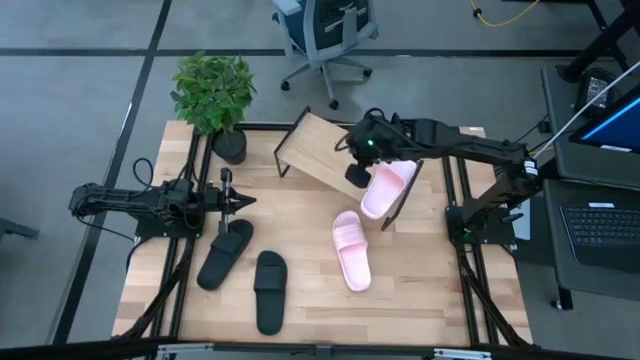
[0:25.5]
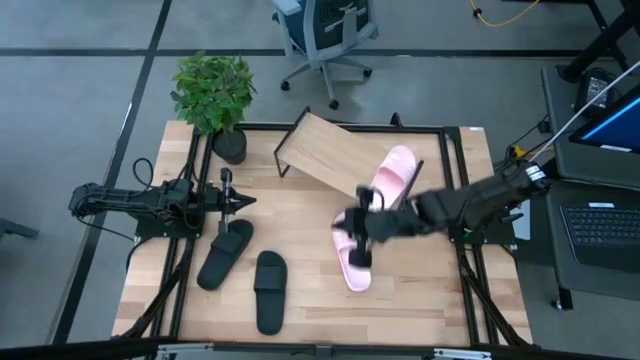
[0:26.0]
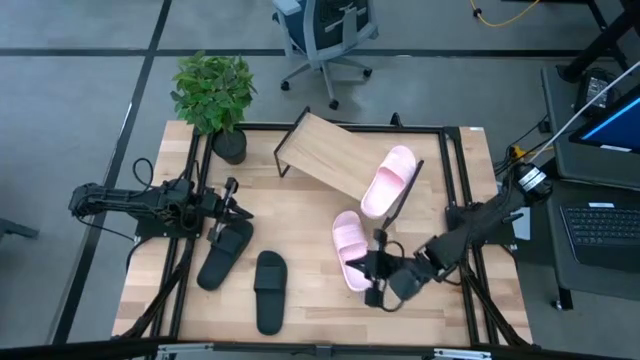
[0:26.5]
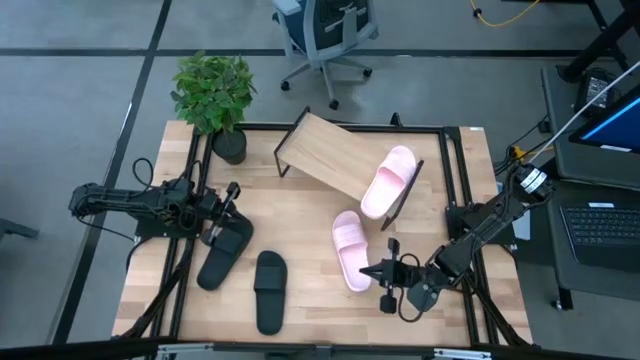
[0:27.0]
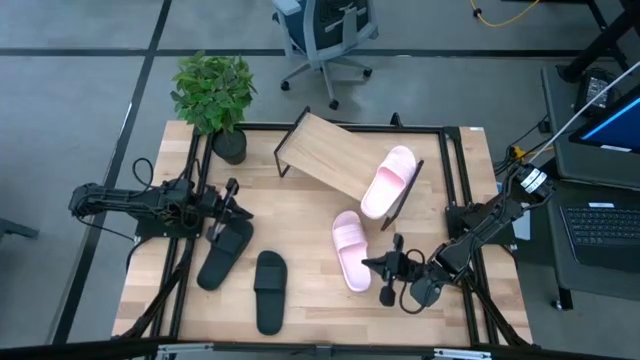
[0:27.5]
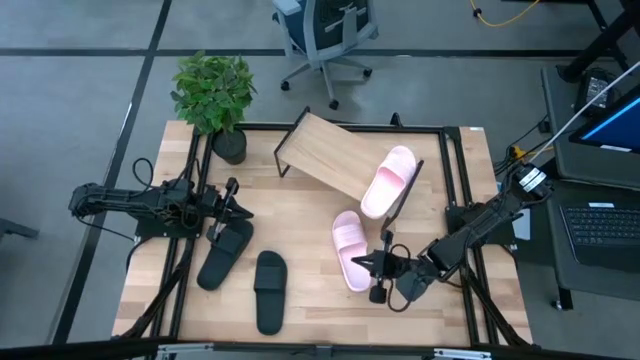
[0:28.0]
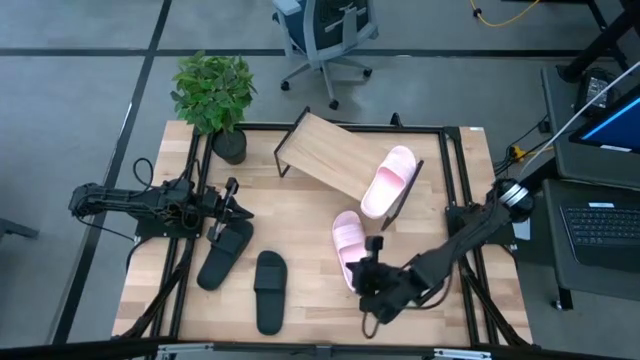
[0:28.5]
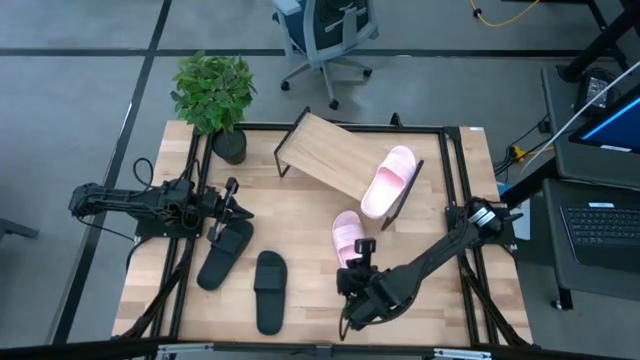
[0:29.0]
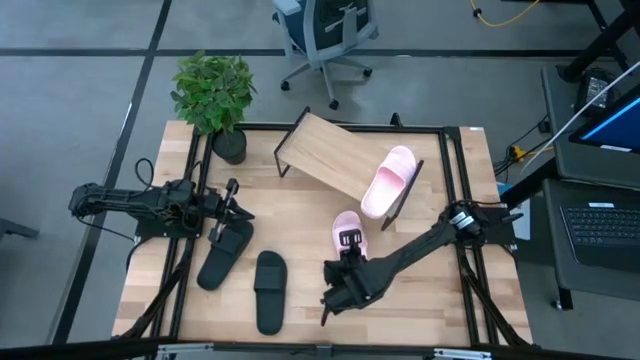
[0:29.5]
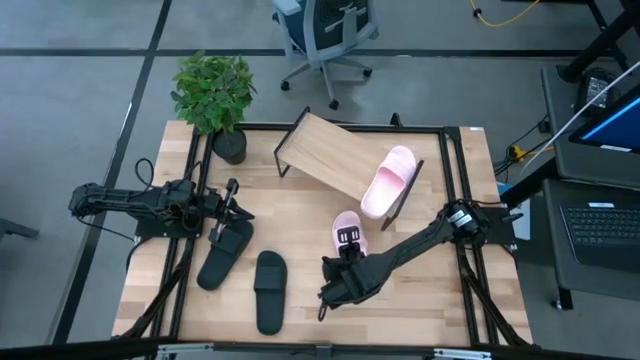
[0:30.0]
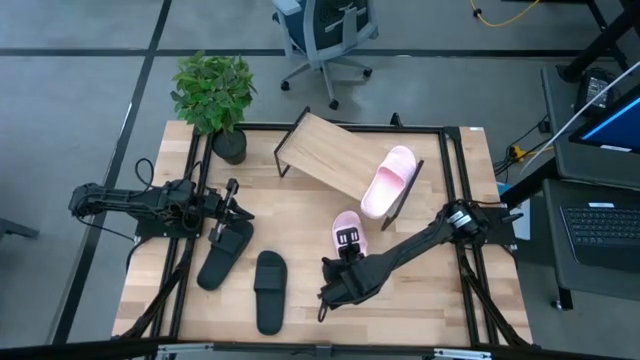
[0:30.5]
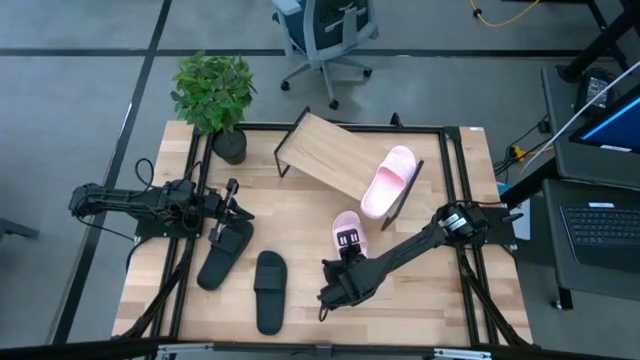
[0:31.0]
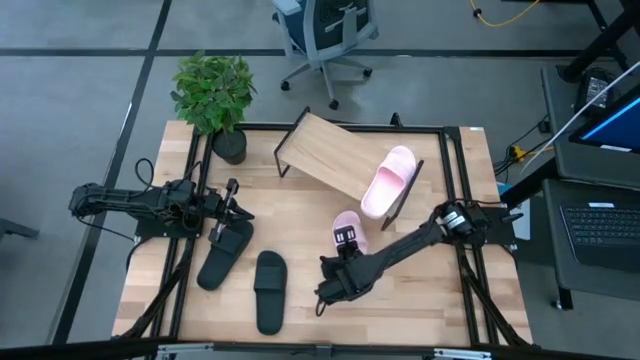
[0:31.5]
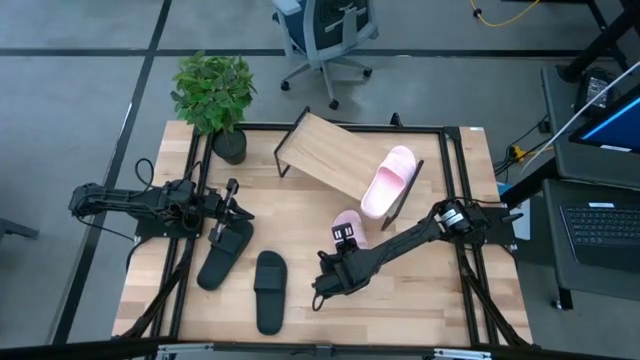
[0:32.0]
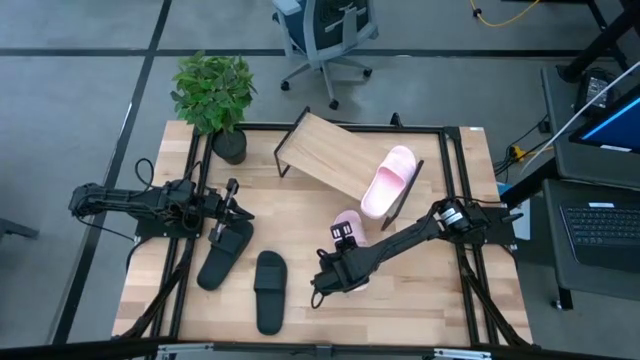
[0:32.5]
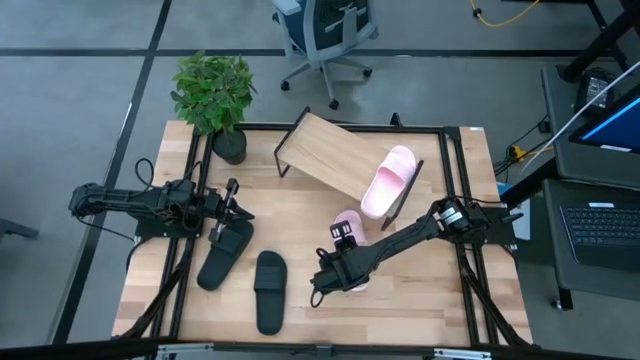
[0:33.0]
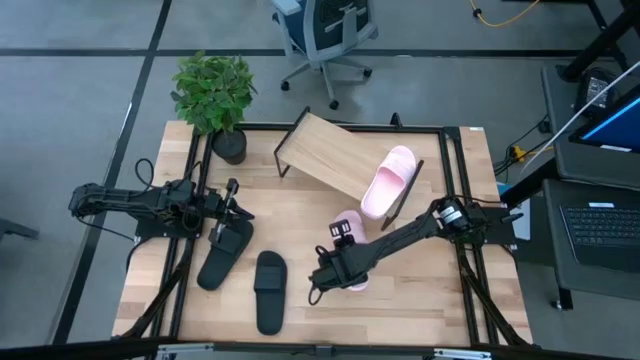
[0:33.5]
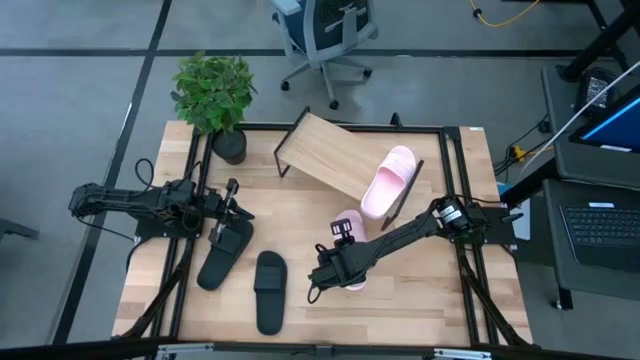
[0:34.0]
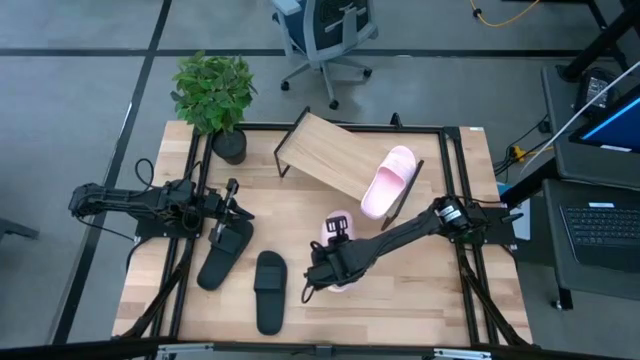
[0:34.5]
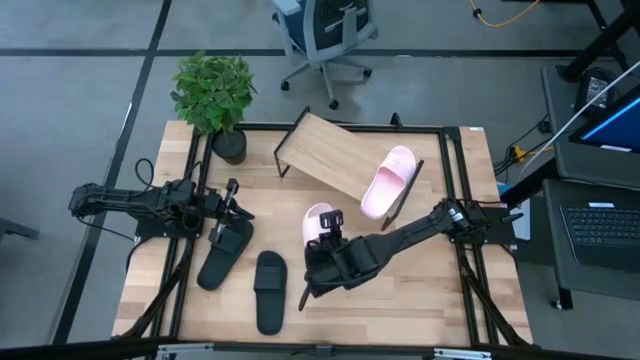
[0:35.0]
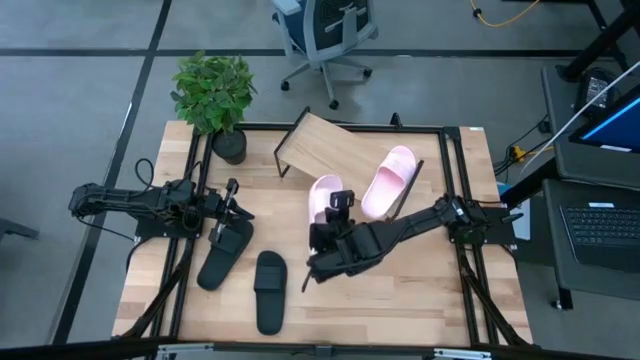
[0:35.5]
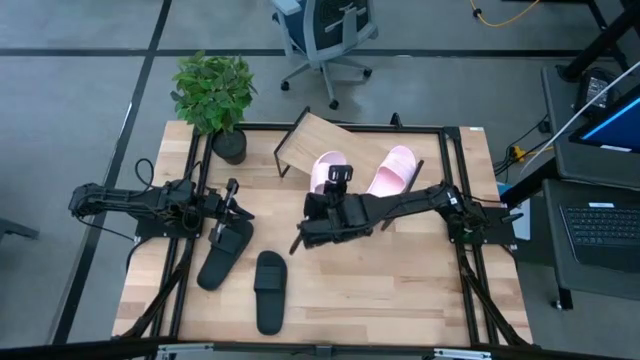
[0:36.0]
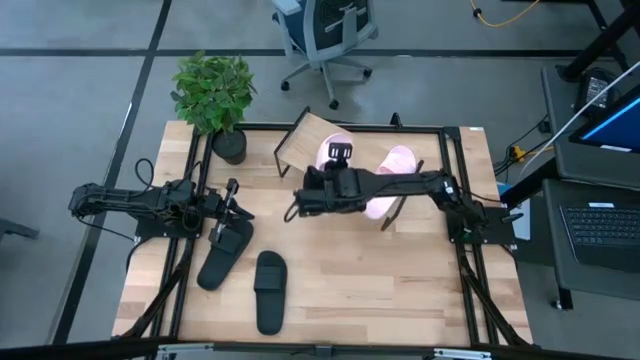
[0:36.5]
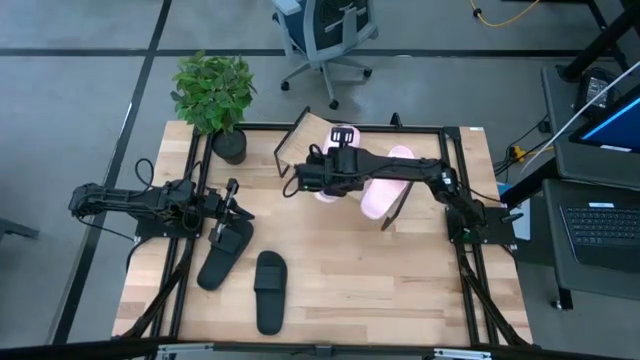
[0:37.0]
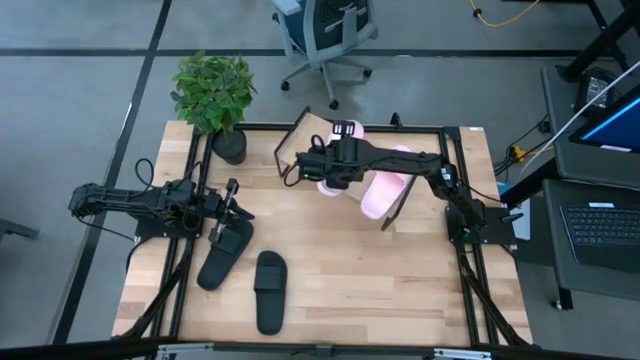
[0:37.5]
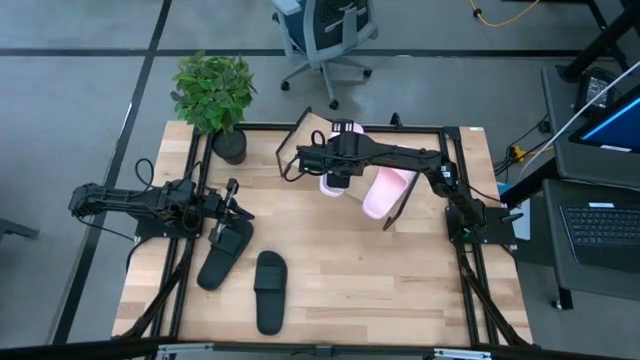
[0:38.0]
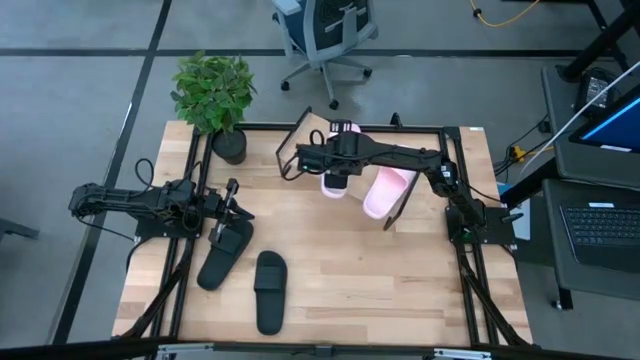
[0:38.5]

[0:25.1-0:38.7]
Task: Pick and place slides into the shelf
Put the pink slide on the shelf

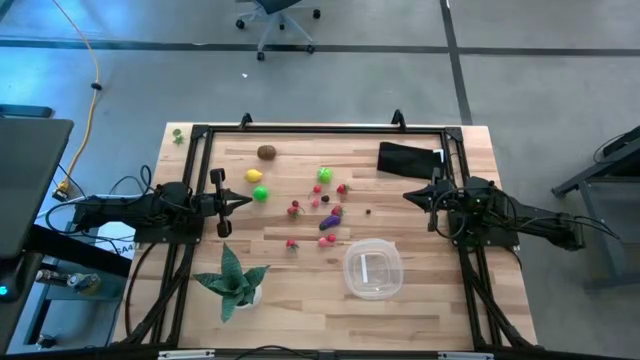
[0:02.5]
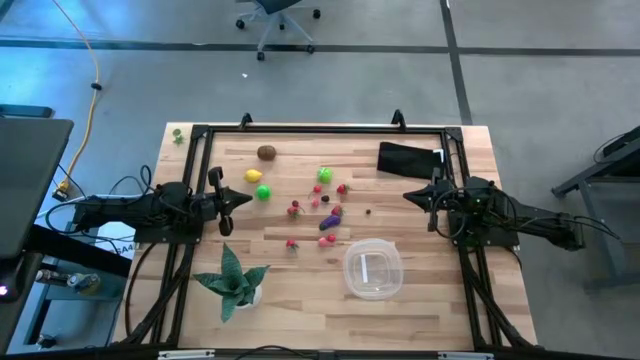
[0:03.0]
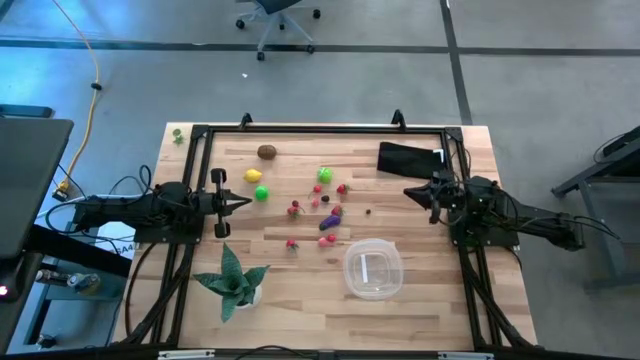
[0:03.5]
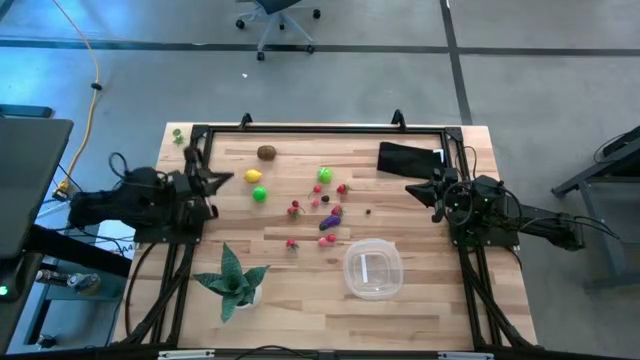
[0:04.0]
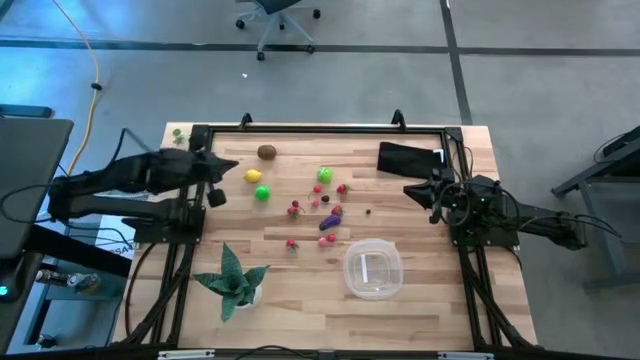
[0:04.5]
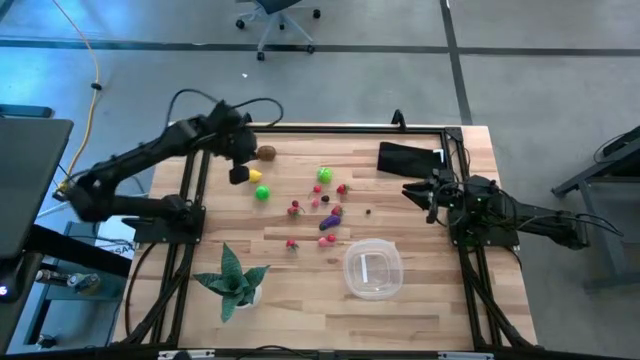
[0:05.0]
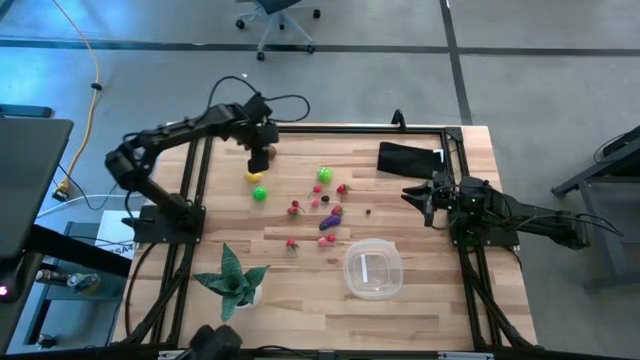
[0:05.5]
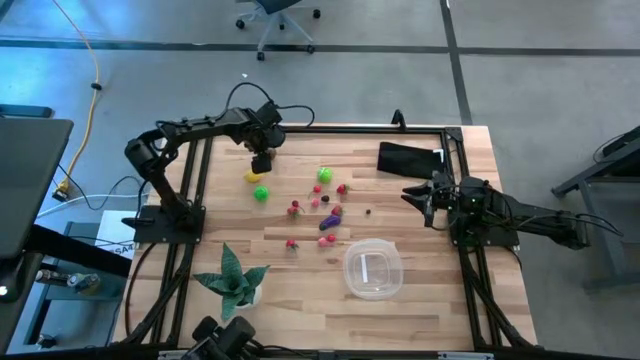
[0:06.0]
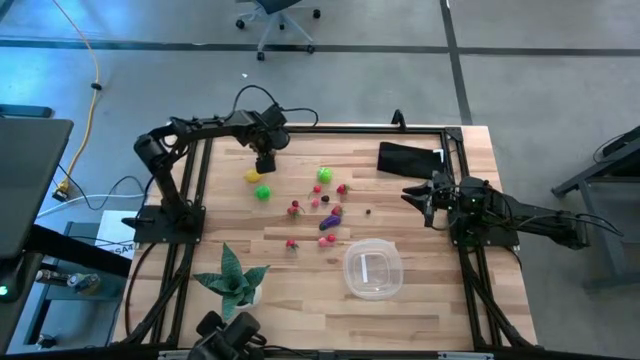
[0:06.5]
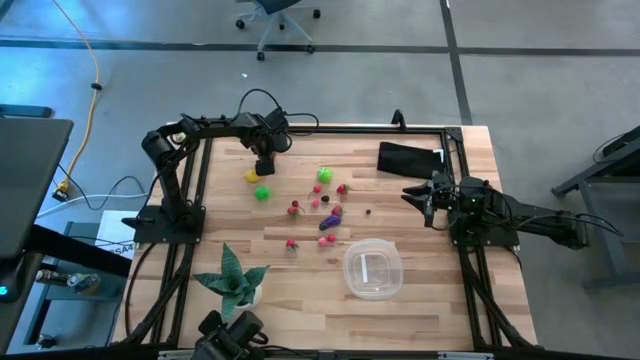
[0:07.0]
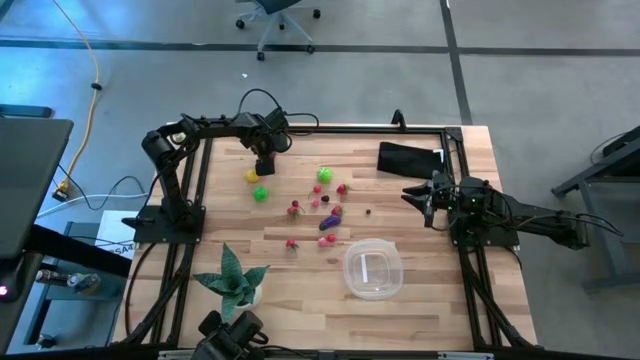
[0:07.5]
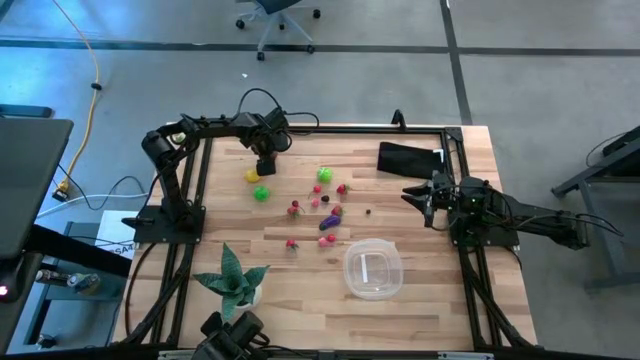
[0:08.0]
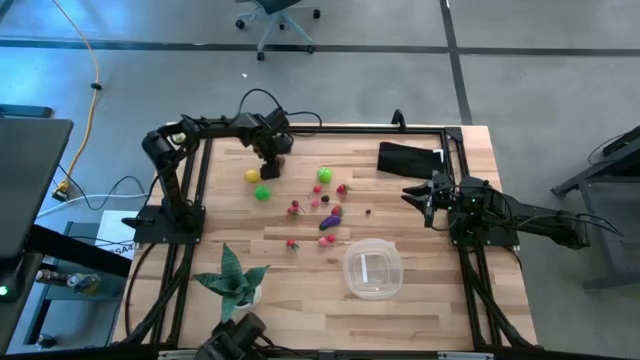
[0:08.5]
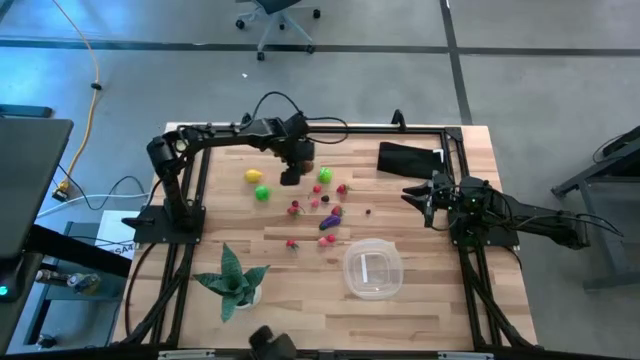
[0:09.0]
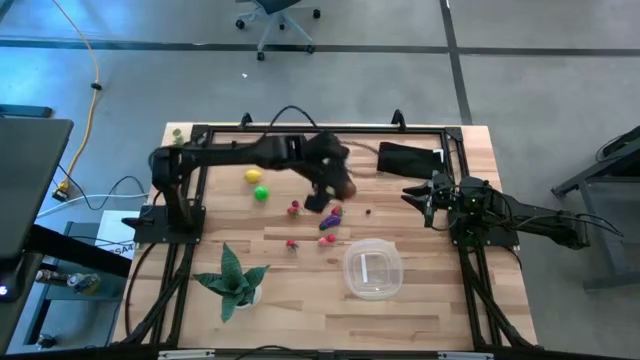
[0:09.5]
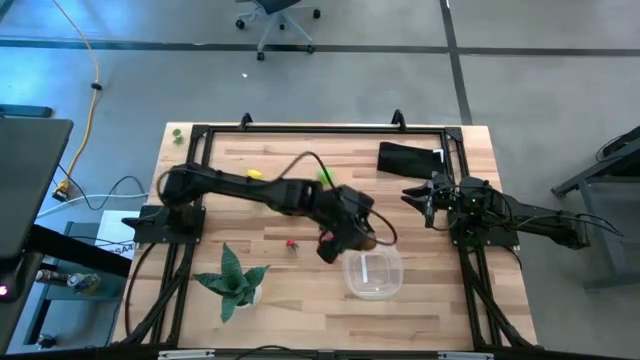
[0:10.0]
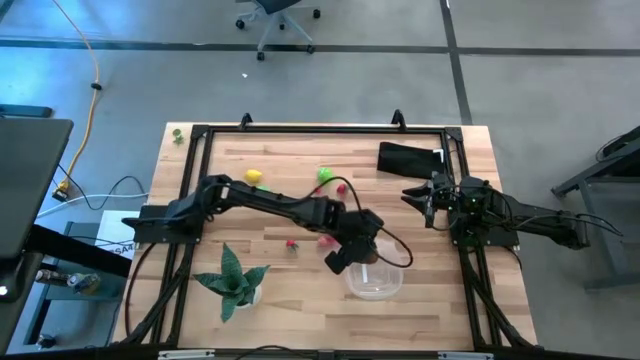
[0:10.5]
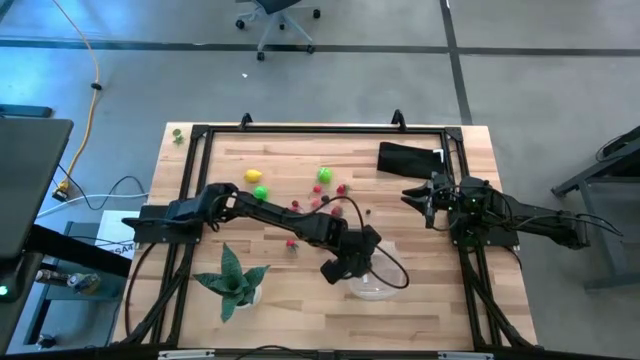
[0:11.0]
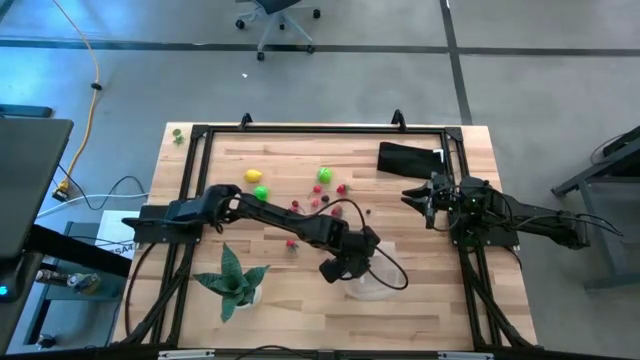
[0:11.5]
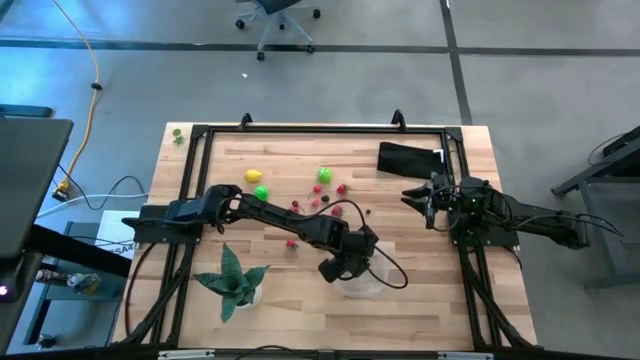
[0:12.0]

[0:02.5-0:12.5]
Task: Pick and placing Produce into tupperware
Put the kiwi into the transparent bin
